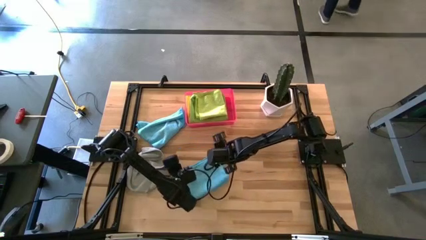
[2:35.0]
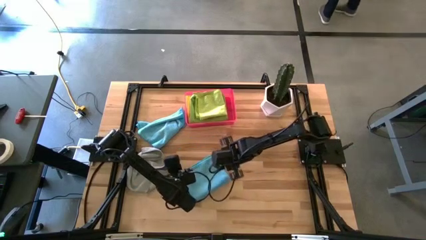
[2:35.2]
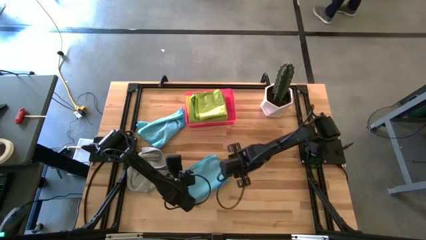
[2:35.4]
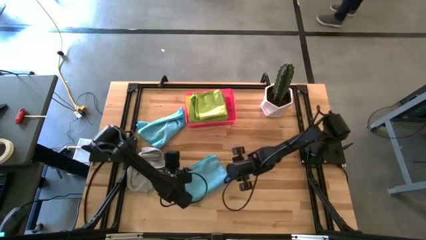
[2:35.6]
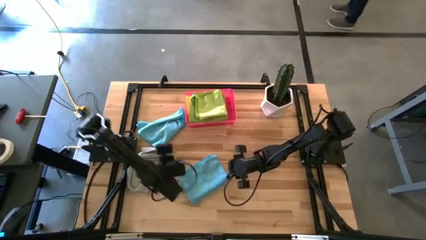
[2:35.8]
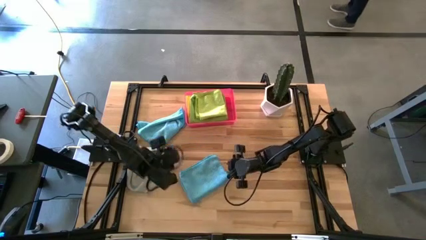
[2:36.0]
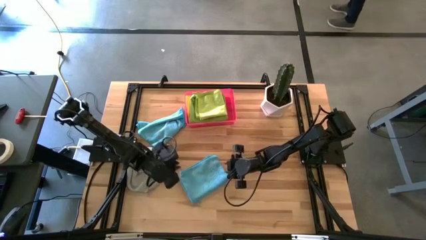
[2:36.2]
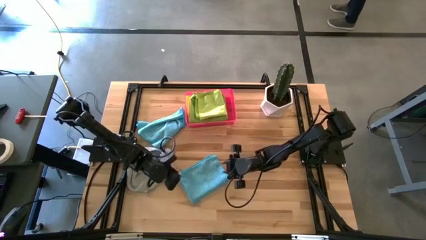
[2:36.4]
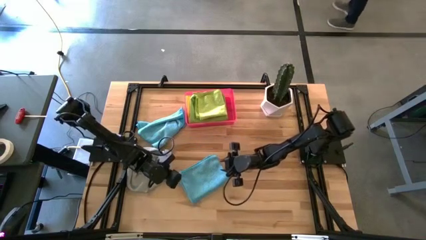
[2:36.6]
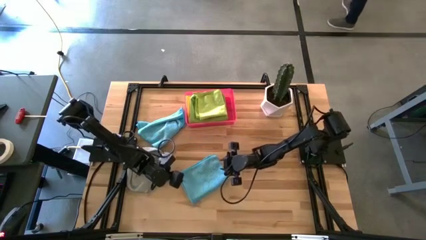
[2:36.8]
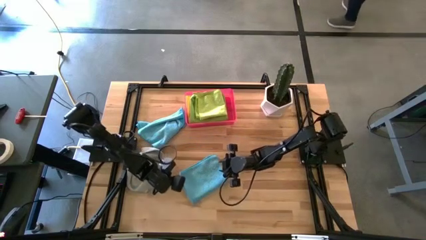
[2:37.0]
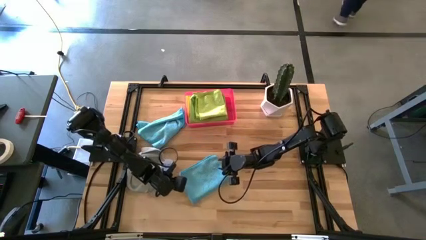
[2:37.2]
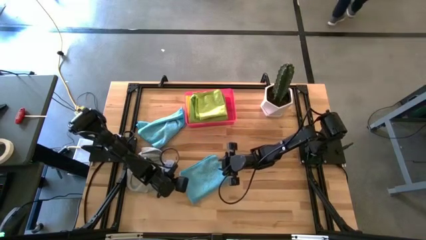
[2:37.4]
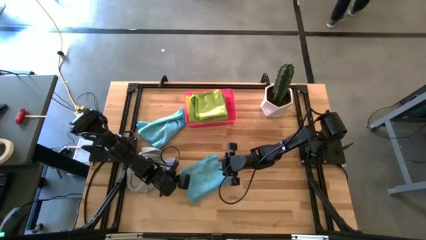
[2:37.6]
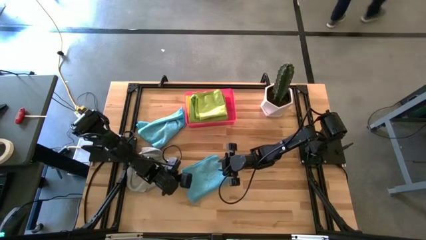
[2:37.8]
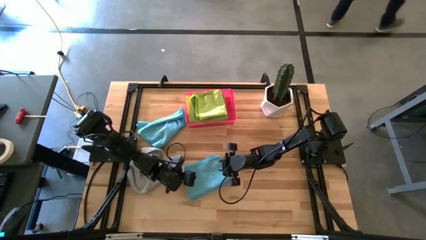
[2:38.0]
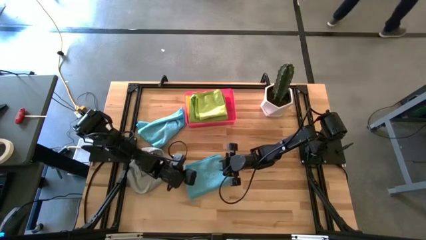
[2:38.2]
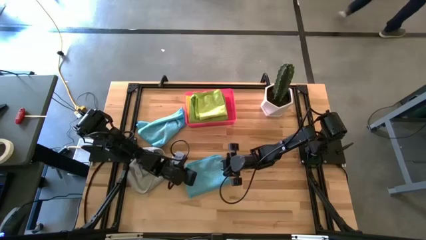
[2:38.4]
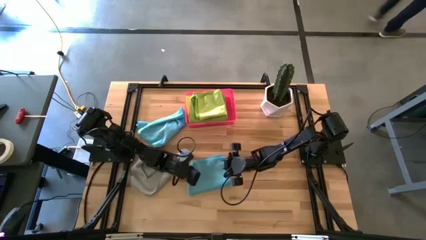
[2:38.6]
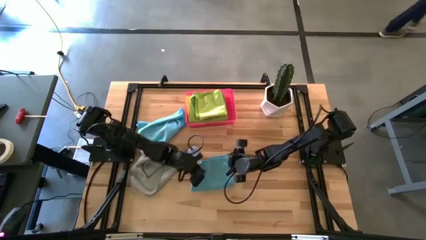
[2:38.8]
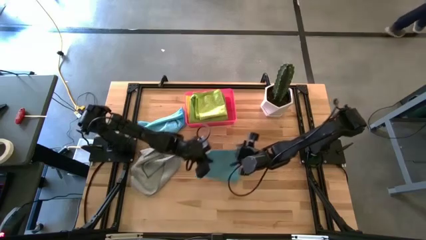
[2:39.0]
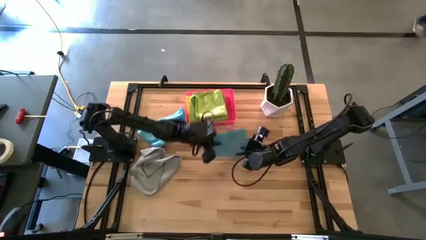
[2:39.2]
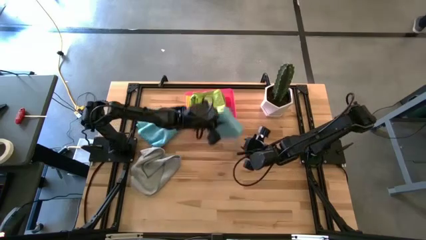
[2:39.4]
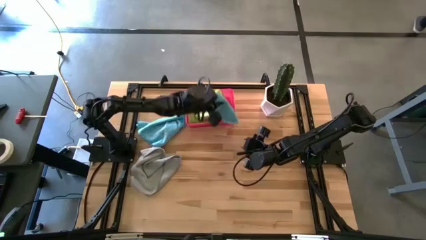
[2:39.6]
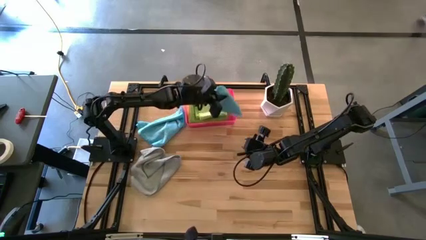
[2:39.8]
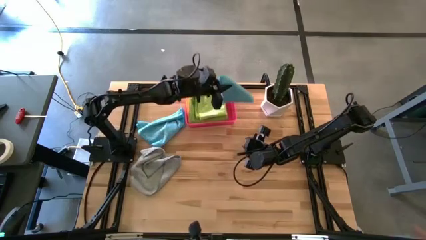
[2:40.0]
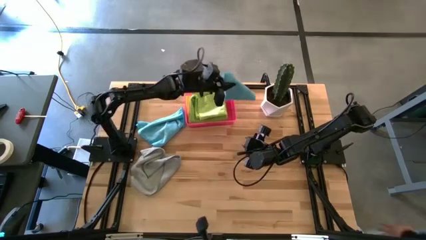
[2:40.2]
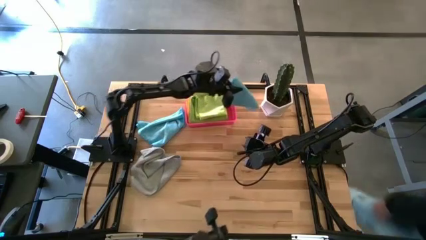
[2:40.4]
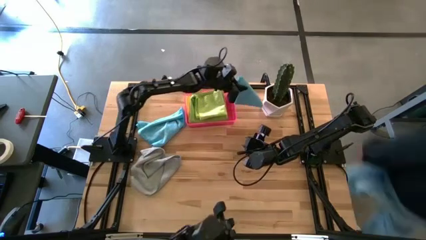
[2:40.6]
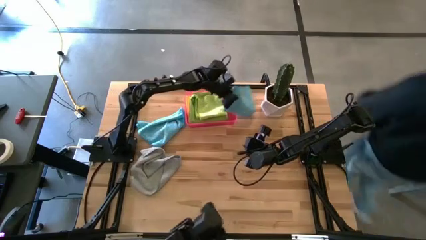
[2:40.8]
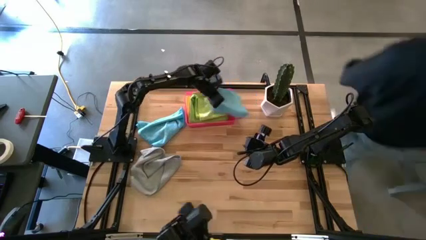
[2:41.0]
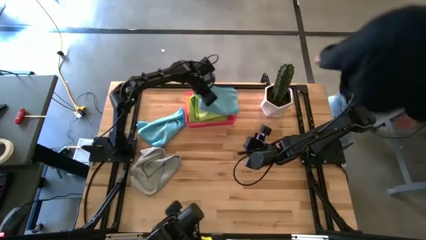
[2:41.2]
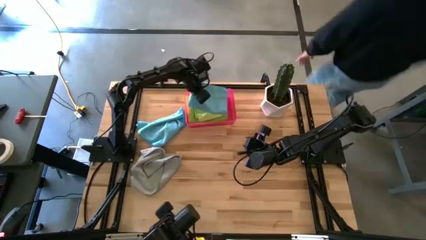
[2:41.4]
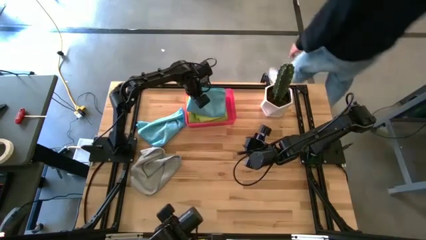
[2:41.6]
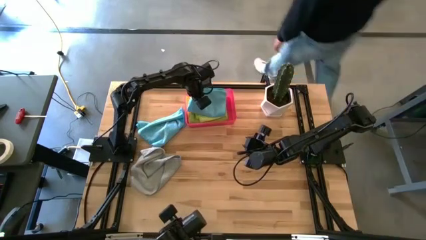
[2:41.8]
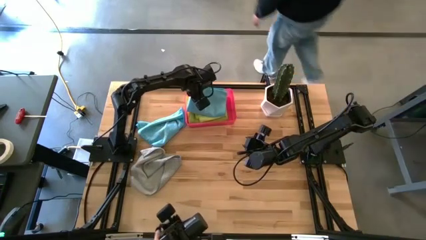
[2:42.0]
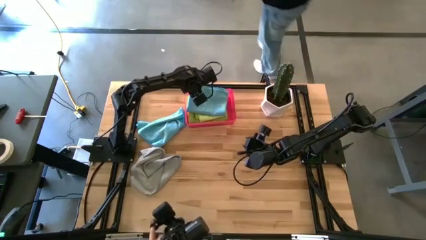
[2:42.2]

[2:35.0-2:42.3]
Task: Fold microfiber towels
Stack the folded bottom blue microfiber cloth on top of the folded light green microfiber cloth

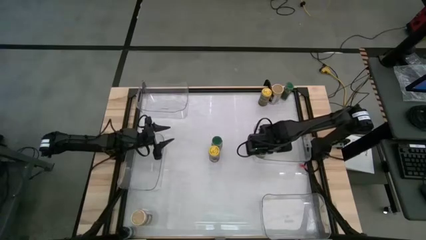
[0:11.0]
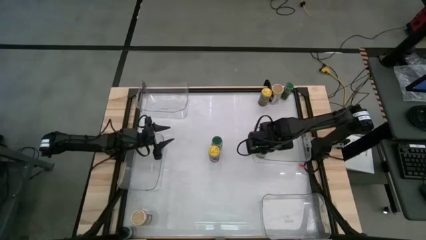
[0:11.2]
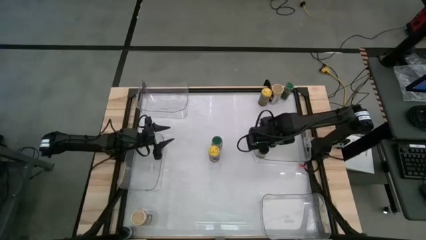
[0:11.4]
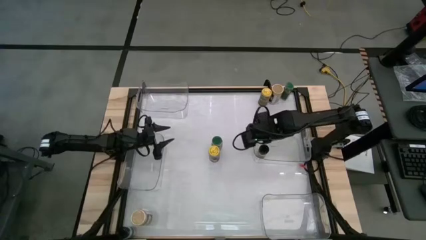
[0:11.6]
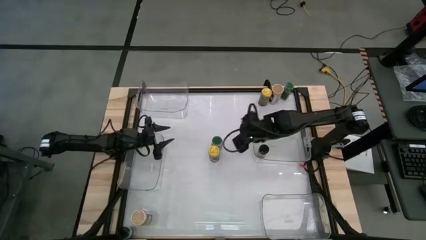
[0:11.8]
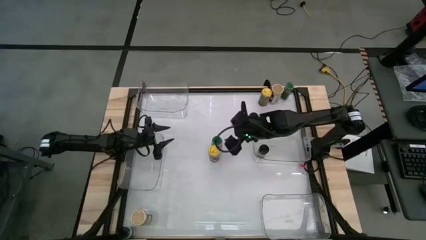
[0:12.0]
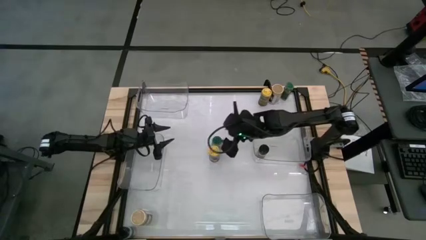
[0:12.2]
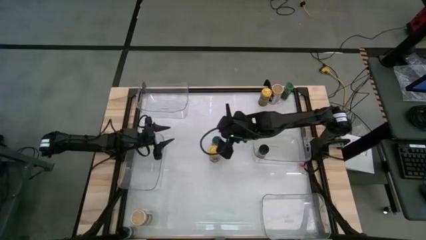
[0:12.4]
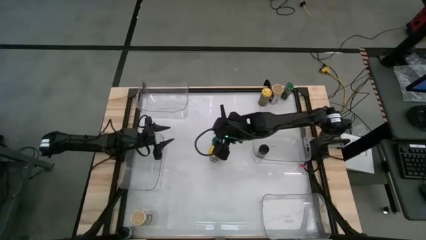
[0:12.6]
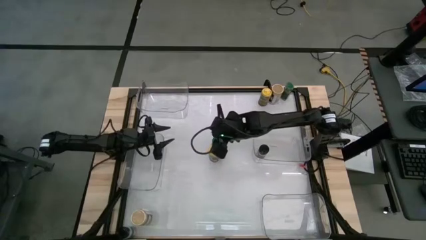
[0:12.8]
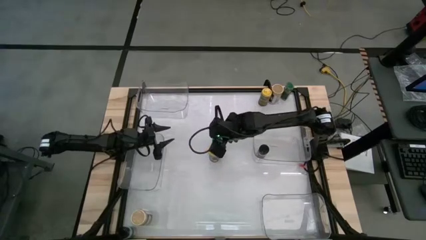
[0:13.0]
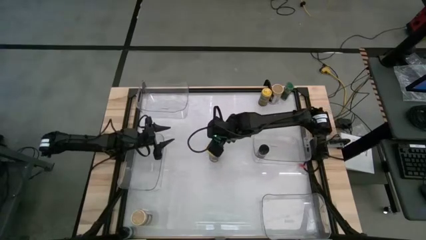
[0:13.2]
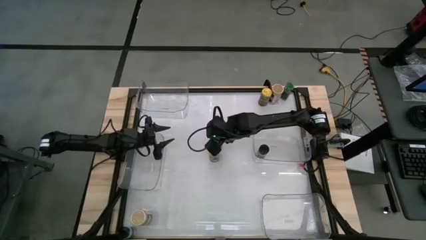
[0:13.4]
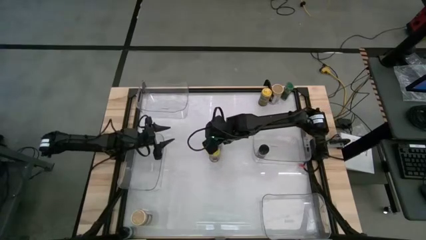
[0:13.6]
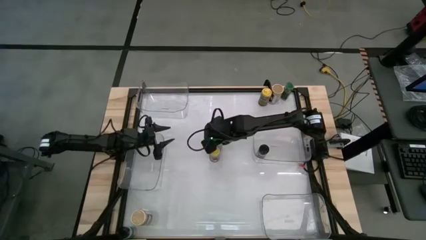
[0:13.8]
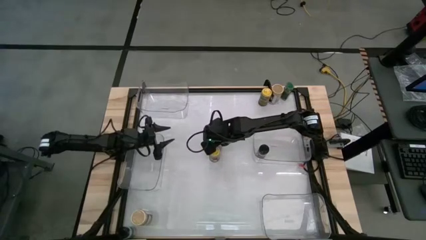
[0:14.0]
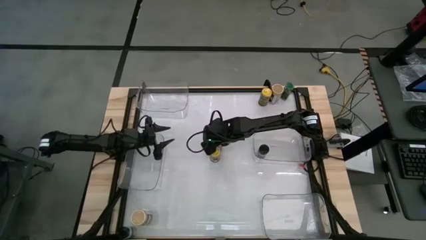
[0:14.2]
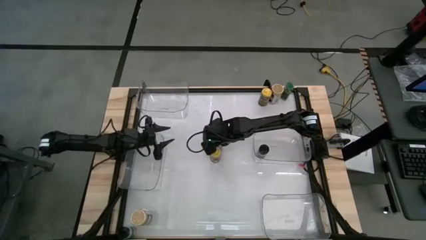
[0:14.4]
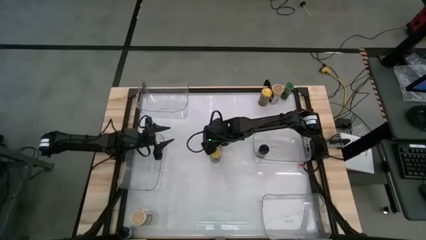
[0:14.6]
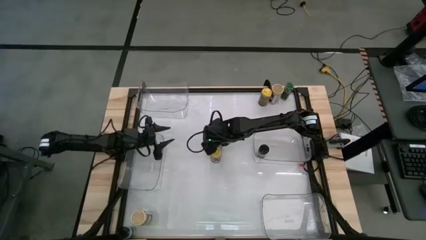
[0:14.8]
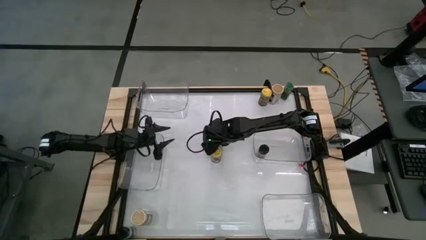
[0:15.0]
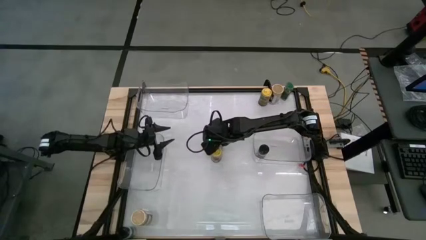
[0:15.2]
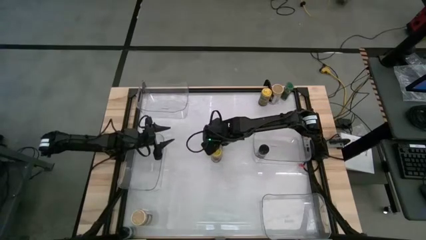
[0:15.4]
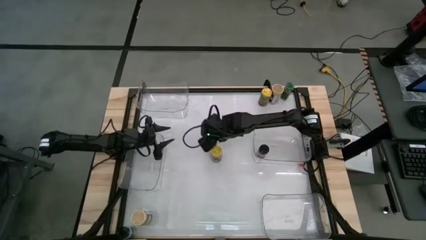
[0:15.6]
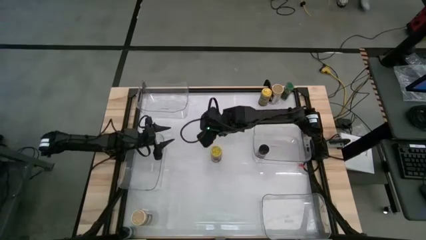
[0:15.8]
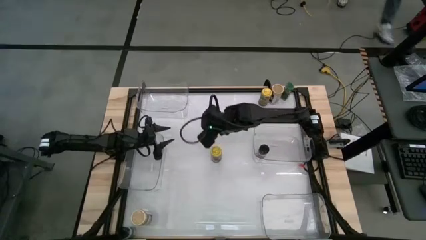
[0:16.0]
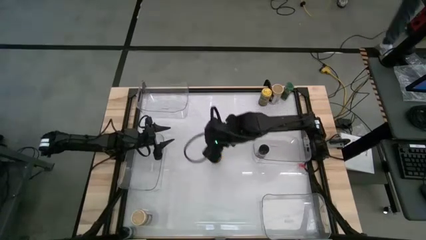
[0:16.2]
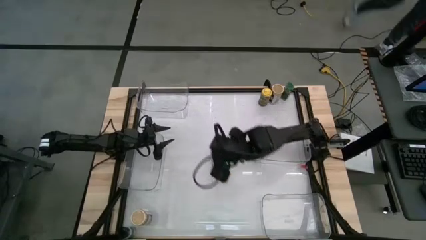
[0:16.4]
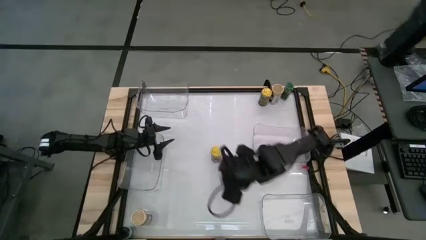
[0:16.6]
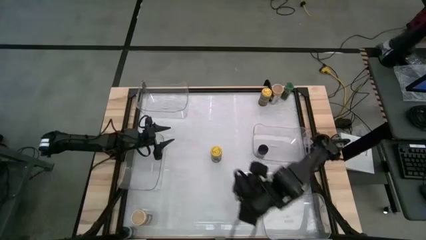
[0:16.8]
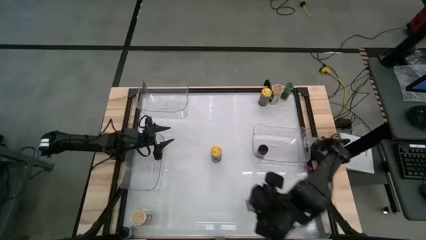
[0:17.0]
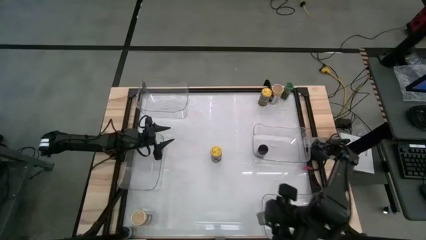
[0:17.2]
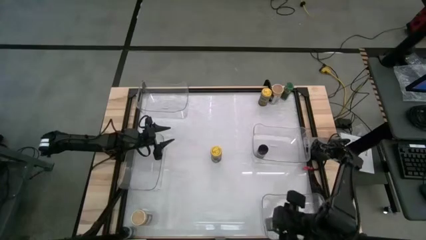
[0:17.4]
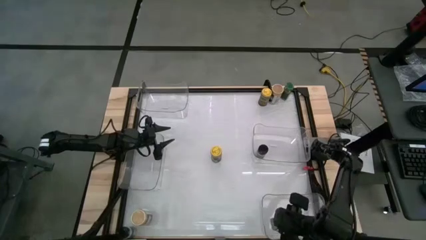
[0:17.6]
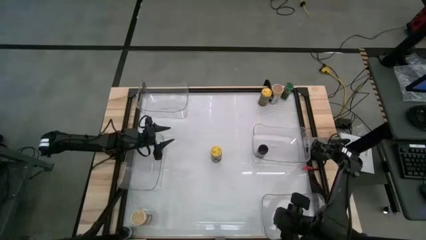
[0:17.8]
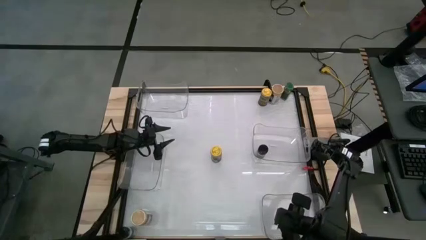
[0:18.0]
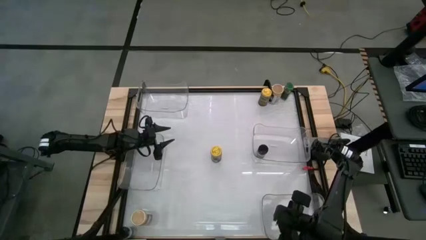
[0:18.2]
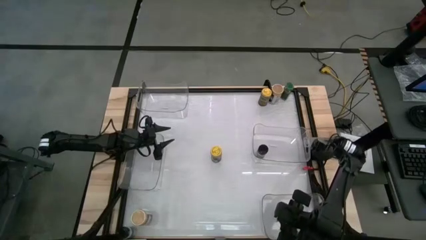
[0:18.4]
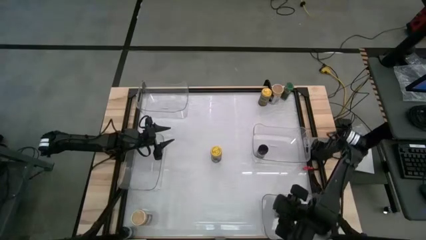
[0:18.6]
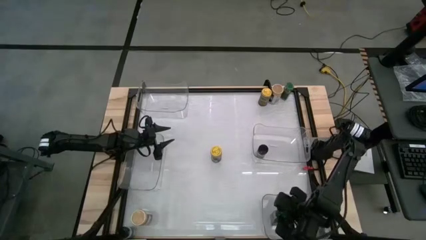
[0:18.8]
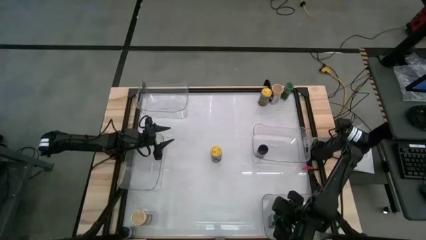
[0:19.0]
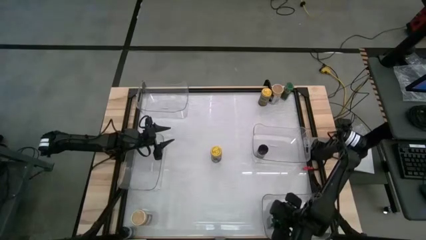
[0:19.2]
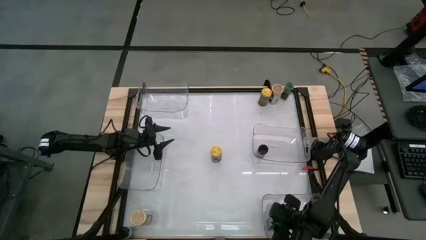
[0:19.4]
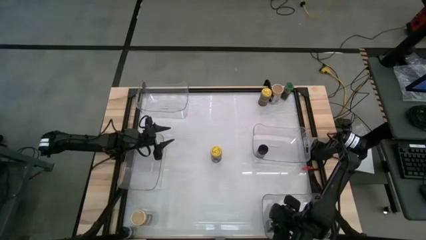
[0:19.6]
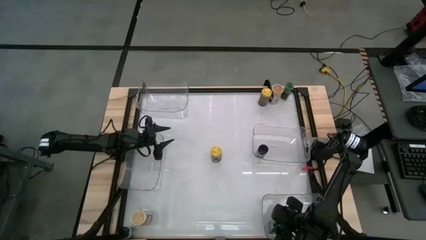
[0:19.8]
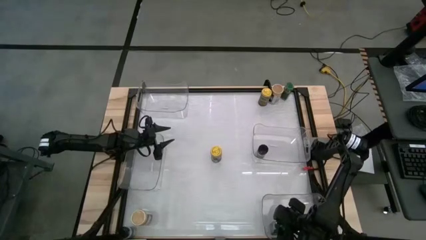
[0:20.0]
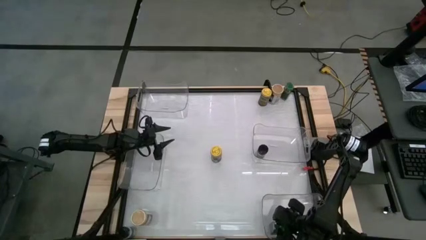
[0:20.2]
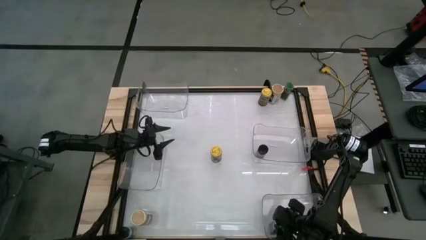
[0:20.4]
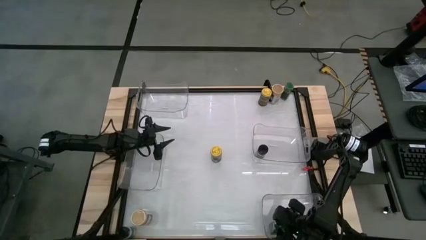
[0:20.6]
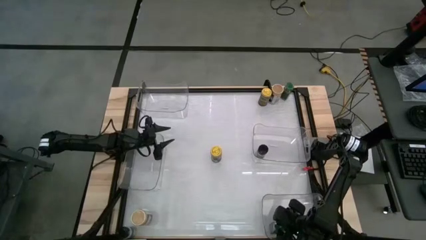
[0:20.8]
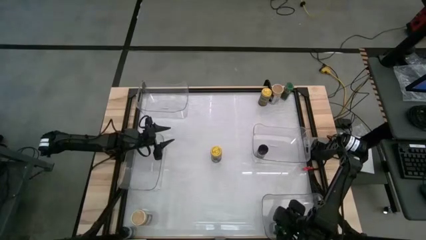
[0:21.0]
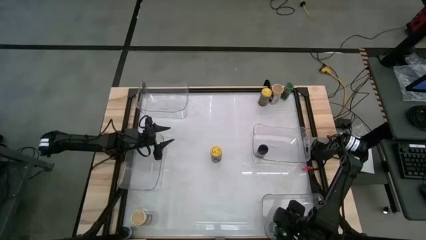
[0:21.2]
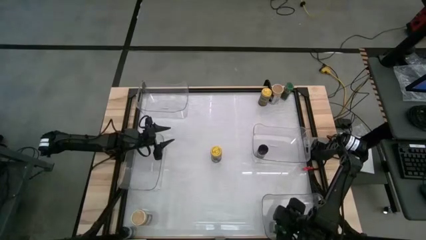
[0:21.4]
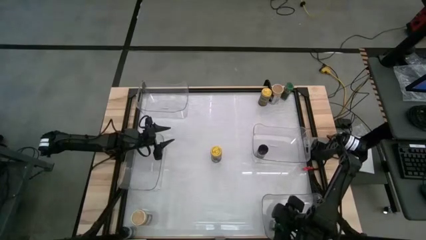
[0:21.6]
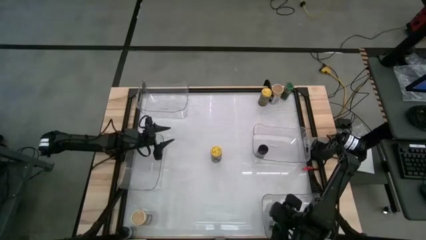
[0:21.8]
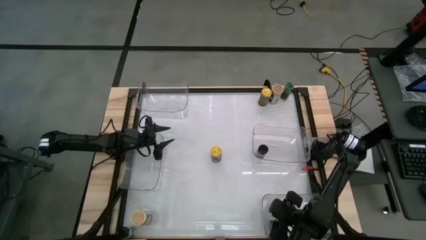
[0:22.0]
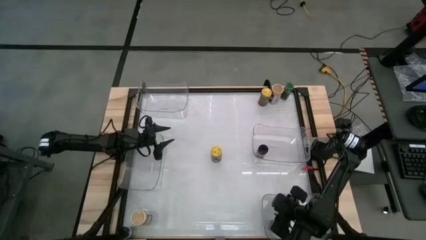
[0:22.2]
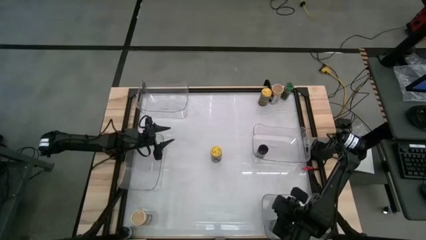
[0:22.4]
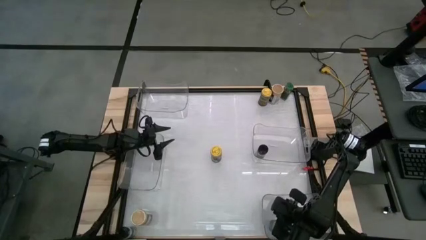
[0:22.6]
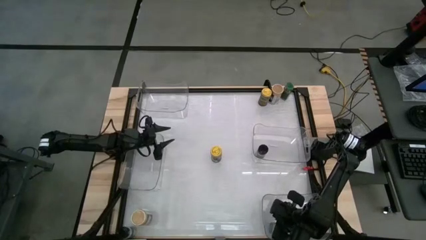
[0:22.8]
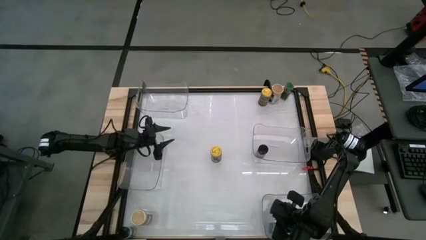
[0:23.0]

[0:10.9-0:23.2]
Task: Sort spices by type
Put the bottom green seasoning bottle into the bottom transparent bin
